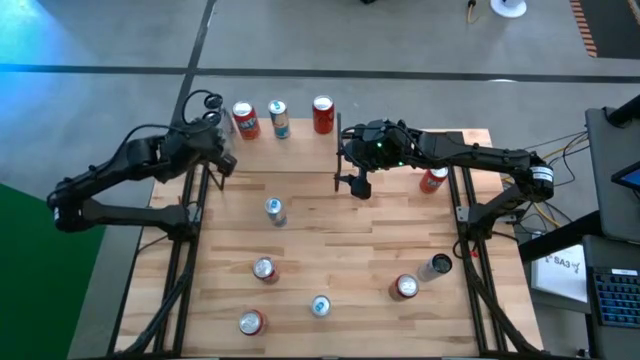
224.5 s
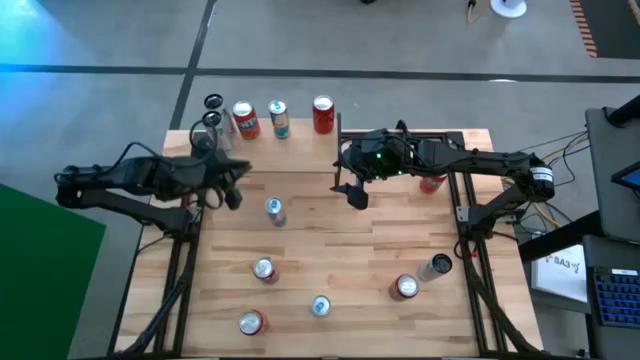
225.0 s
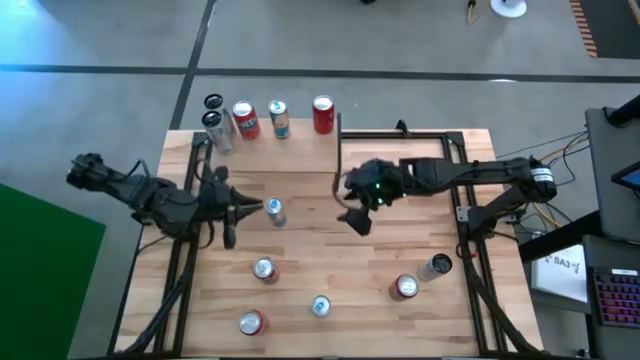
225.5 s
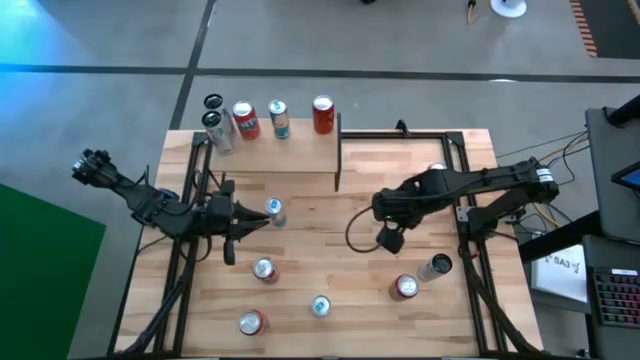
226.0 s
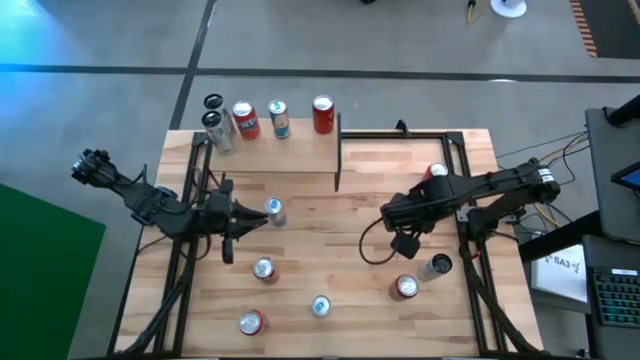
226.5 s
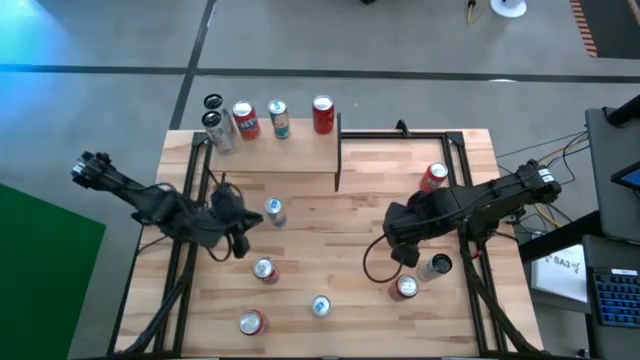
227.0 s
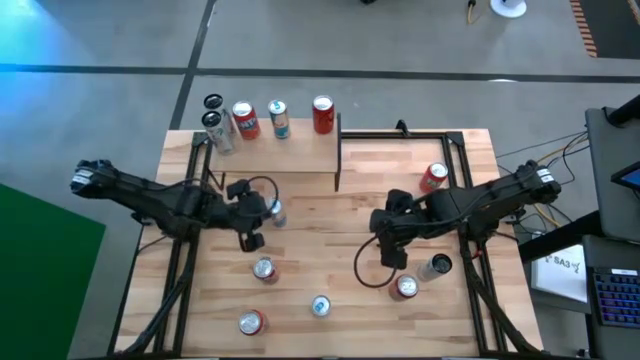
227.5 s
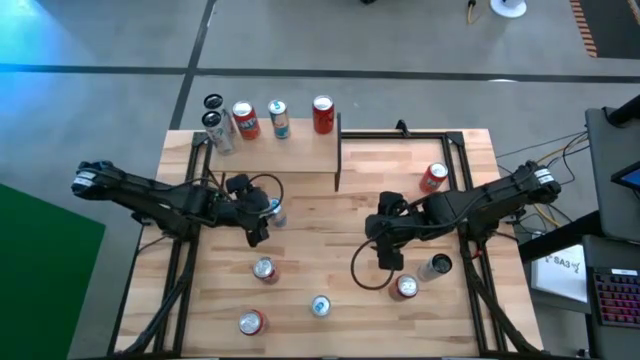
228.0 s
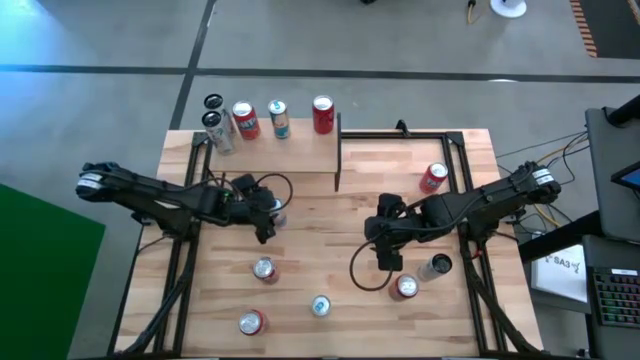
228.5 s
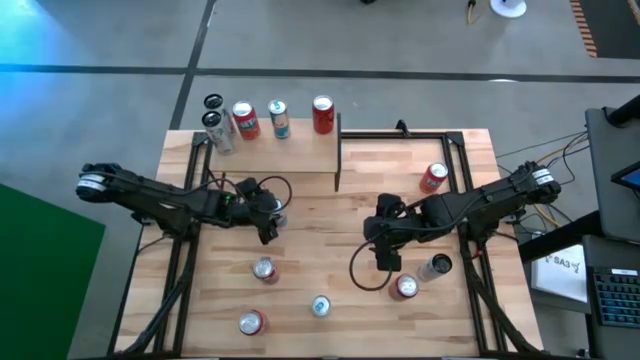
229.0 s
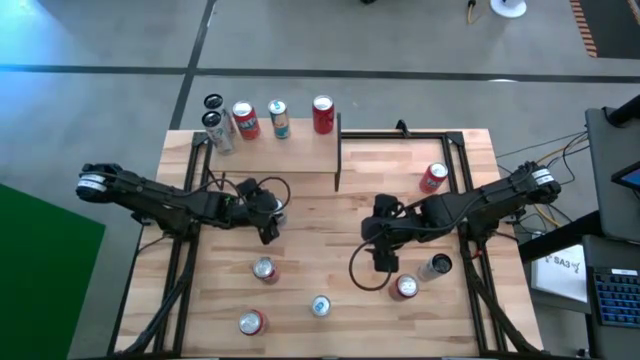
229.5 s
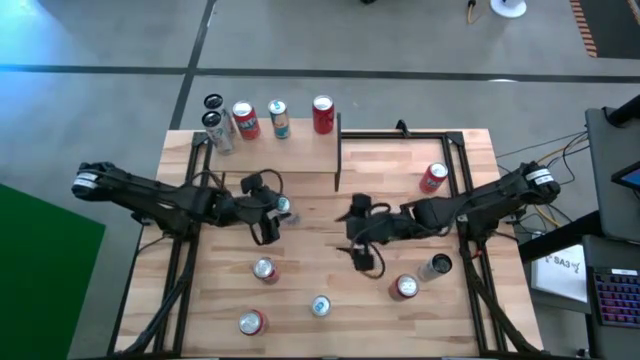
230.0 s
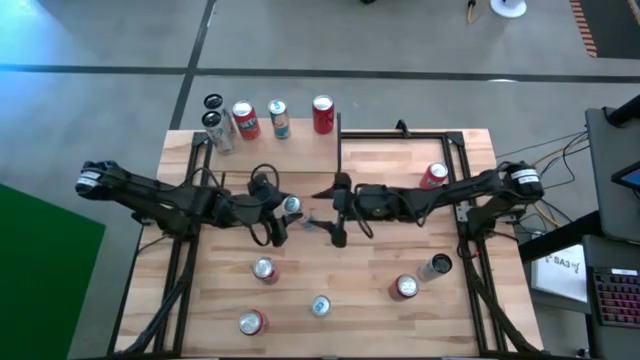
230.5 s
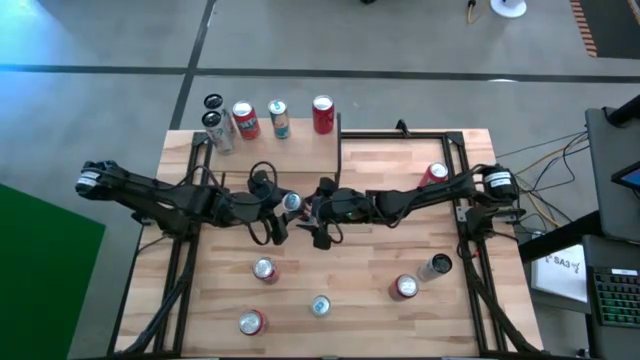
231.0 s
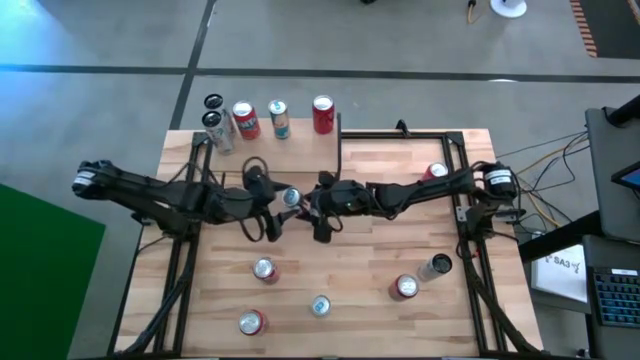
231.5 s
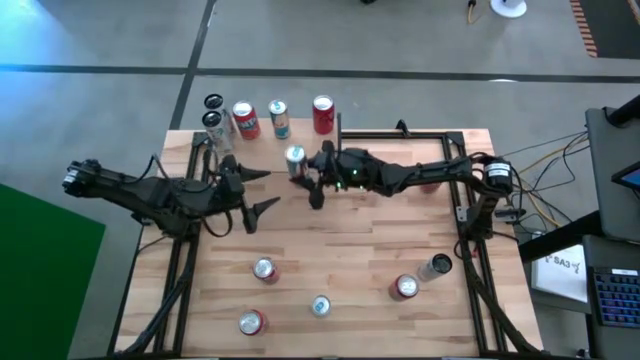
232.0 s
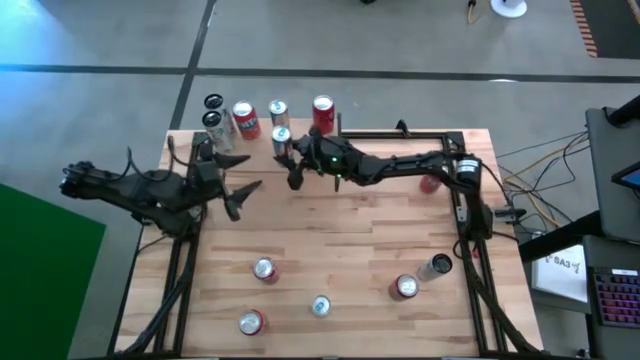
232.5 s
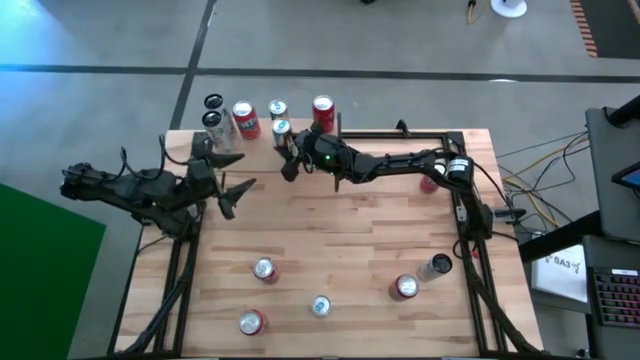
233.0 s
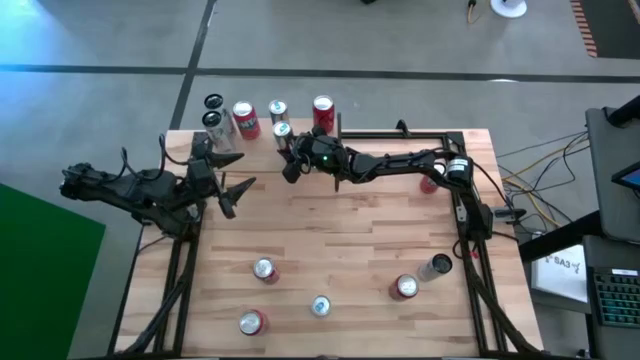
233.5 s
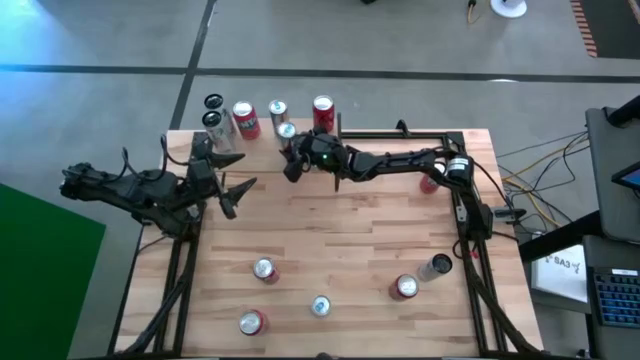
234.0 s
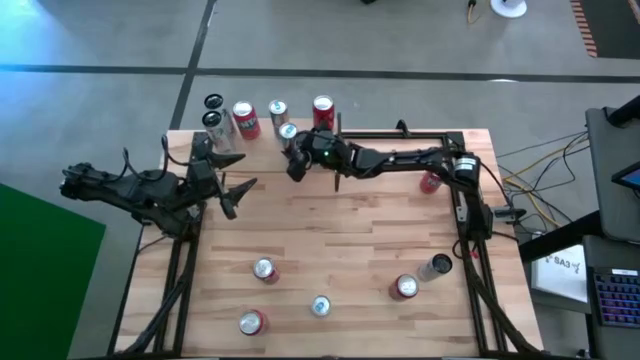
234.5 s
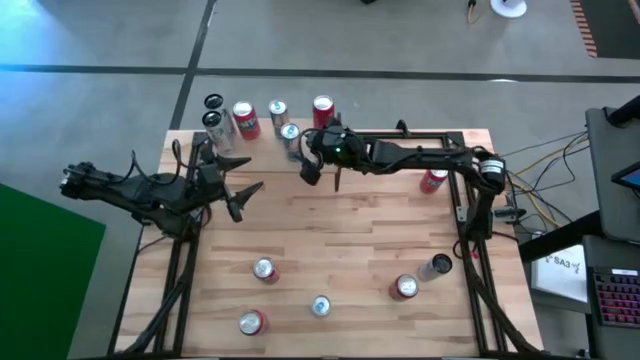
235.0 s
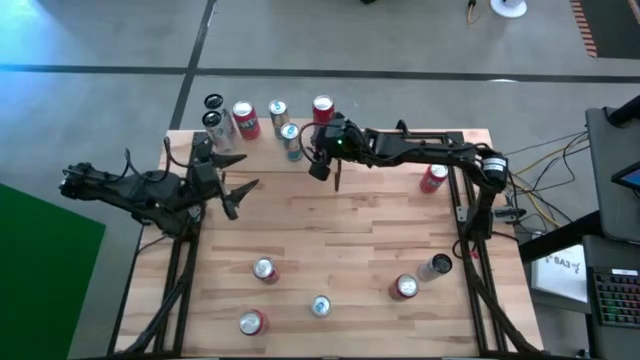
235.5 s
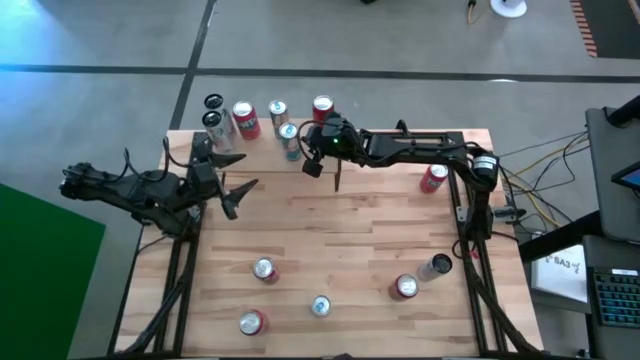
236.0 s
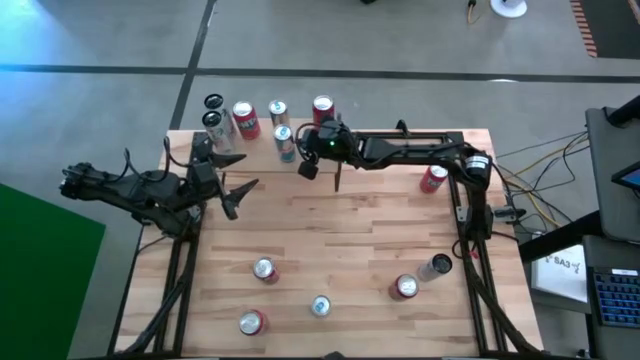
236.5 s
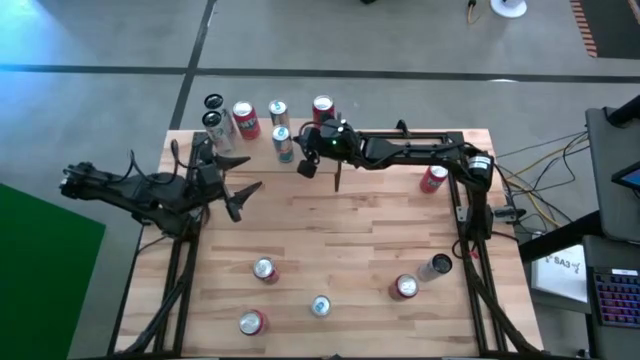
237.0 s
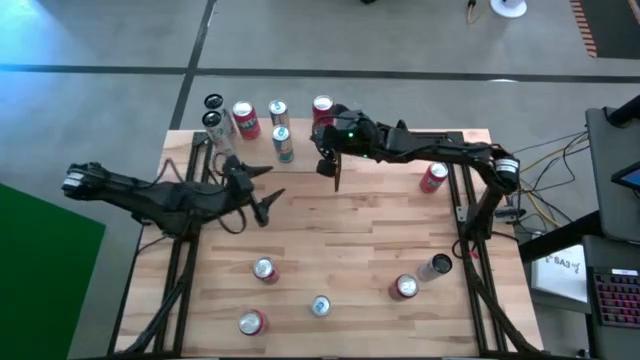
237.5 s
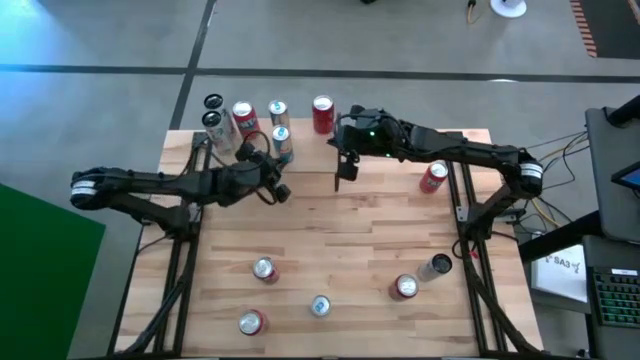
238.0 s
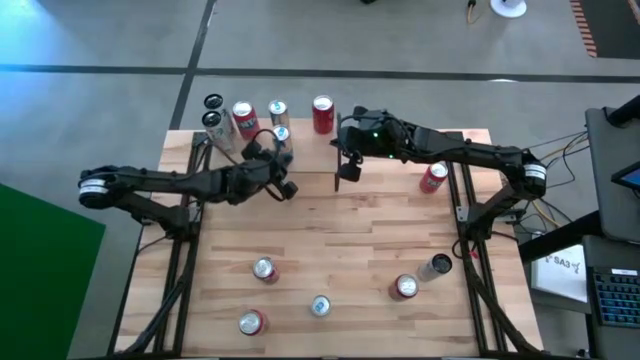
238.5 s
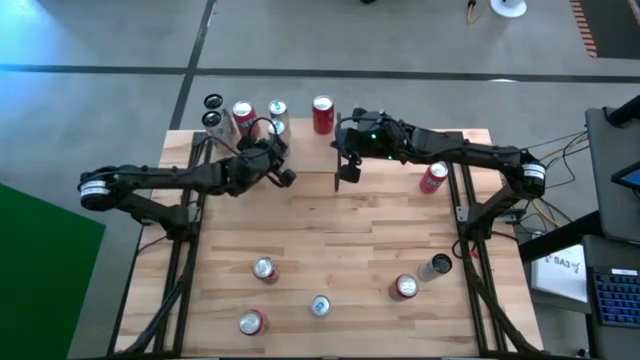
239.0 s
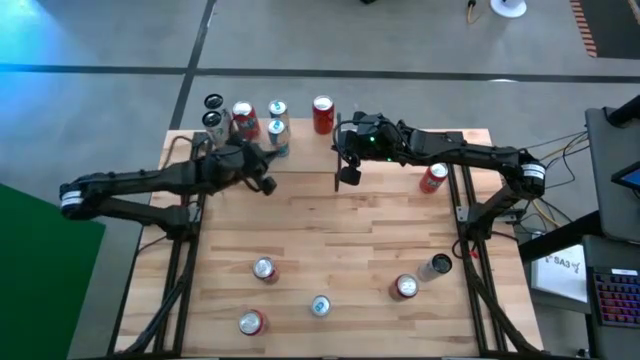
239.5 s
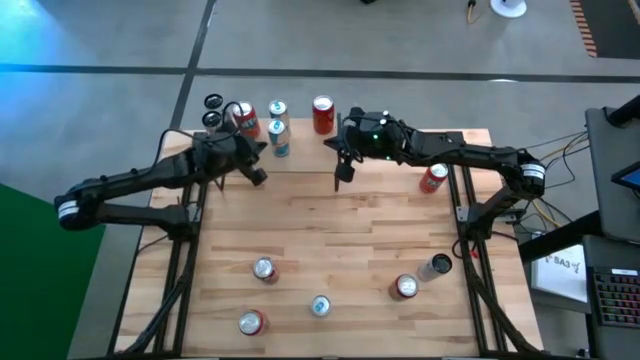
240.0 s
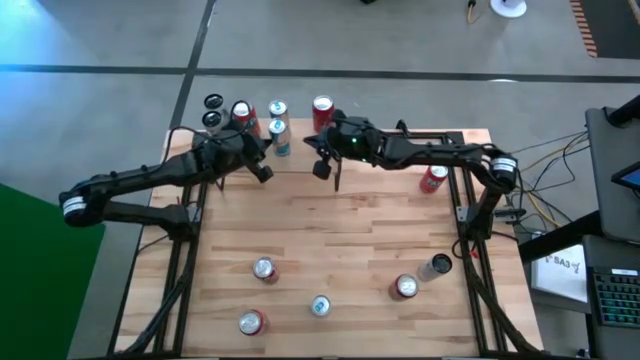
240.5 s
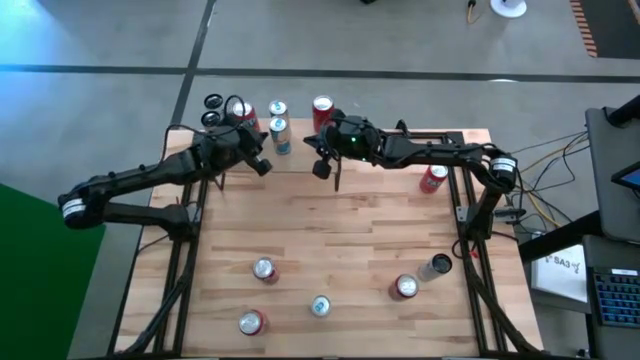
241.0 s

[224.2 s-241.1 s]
Task: Place canned beverage on shelf
Put the blue soda can on the shelf aligned with the other blue soda can

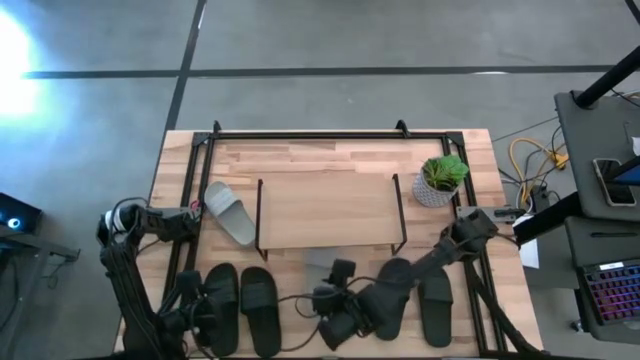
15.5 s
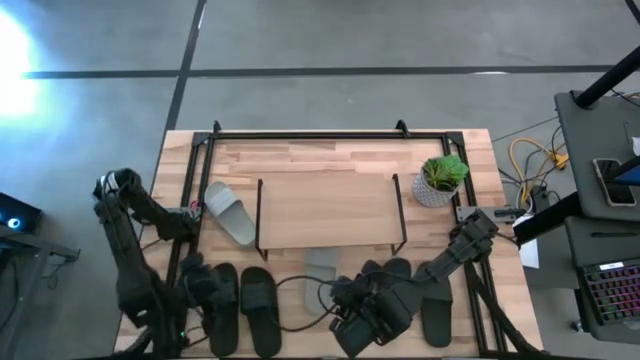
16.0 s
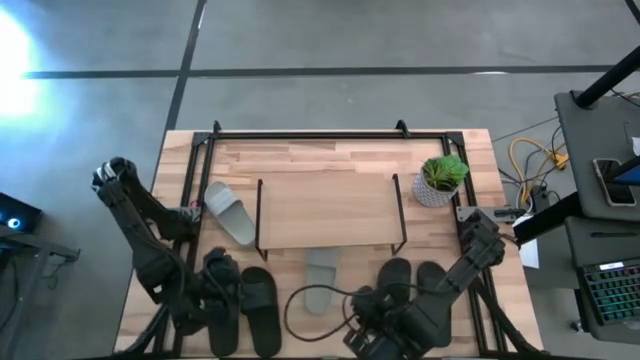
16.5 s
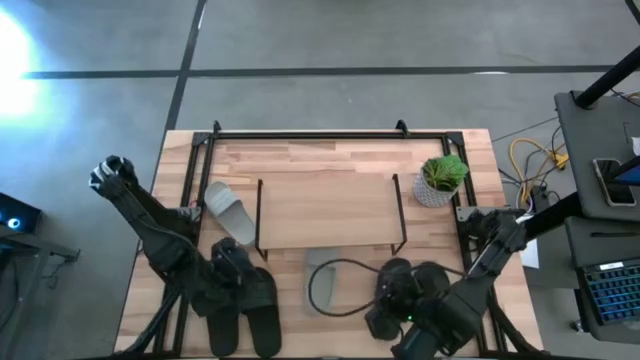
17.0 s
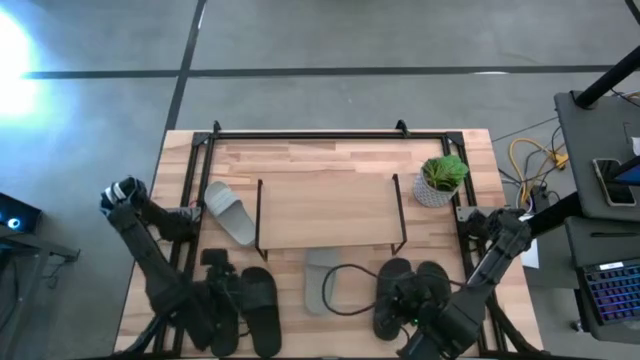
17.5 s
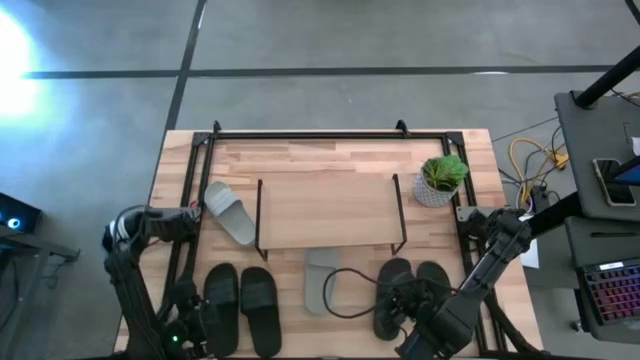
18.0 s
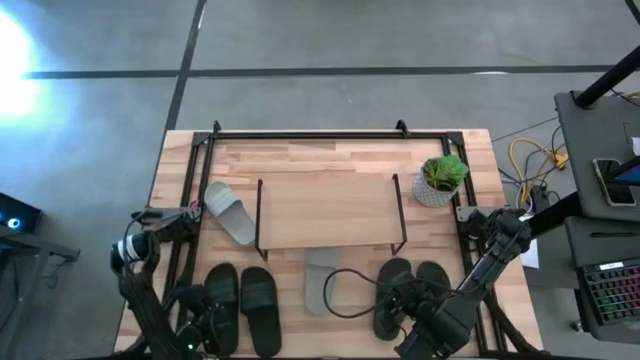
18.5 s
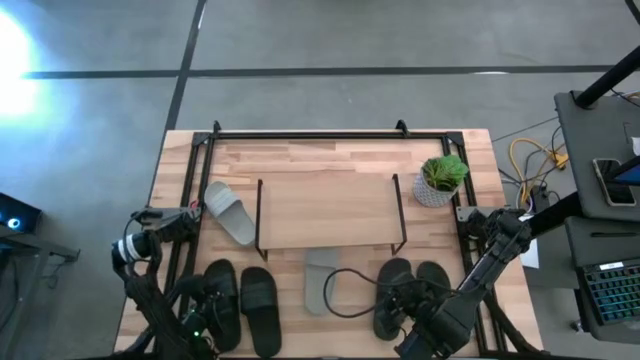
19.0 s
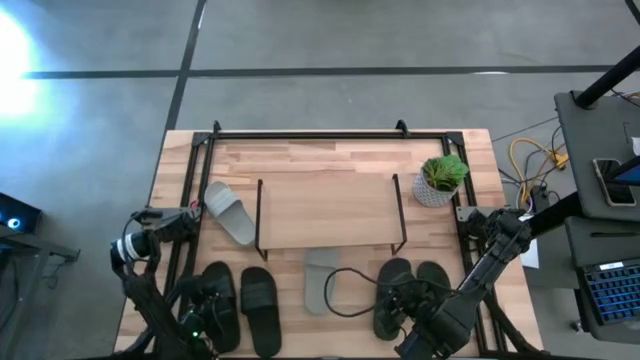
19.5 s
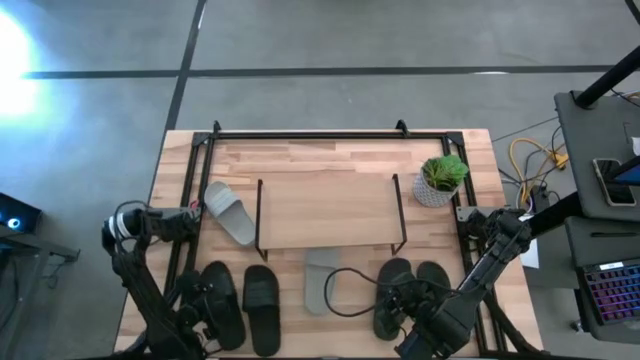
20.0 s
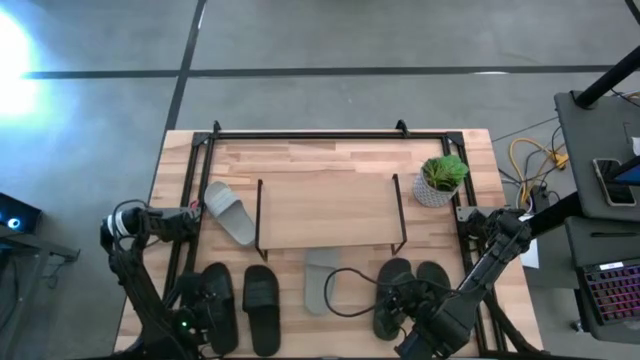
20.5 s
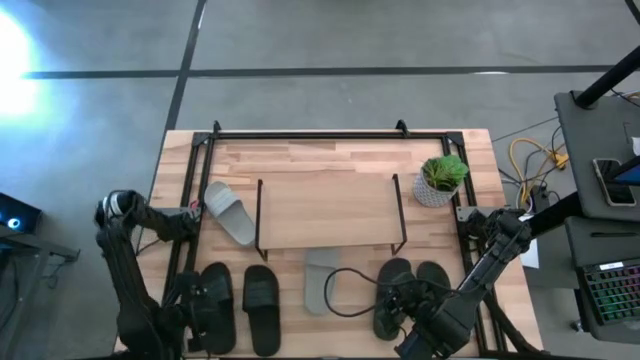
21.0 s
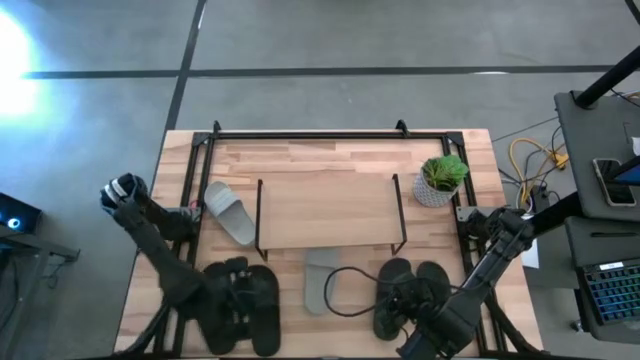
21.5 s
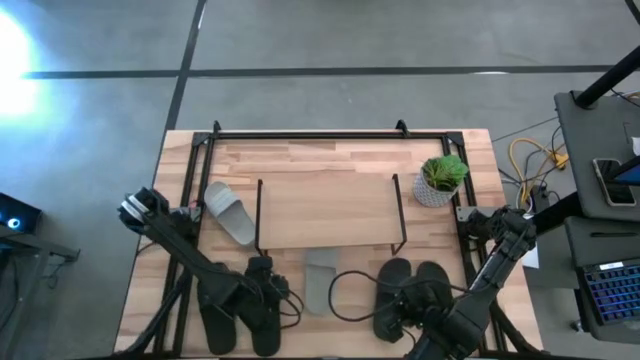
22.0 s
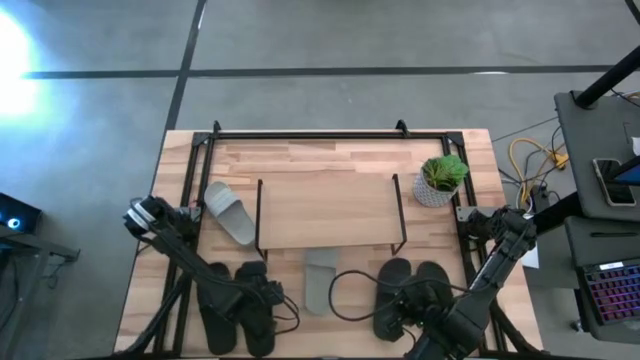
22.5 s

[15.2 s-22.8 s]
Task: Pick and place slides into the shelf
Adjust the black slides on the table
